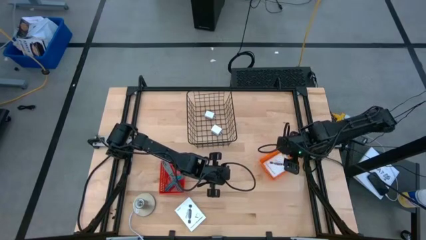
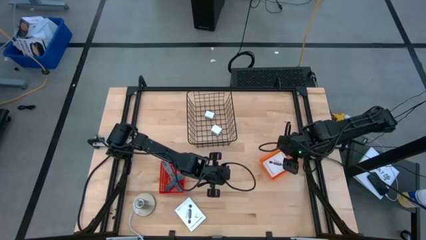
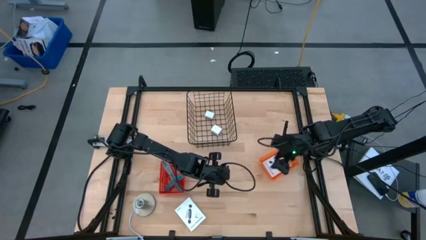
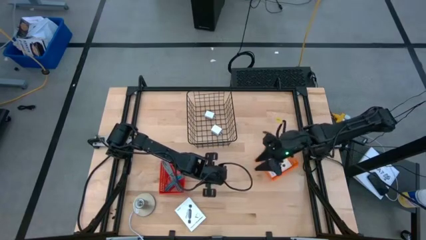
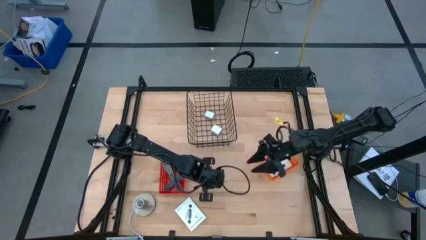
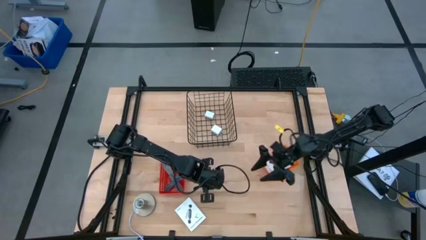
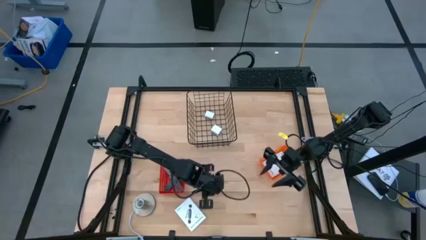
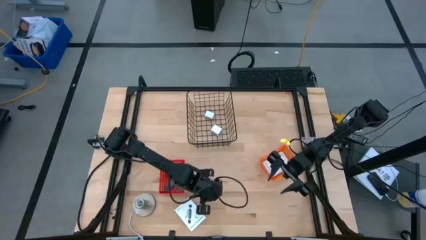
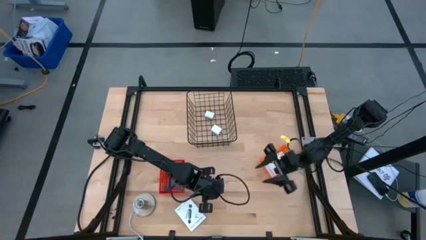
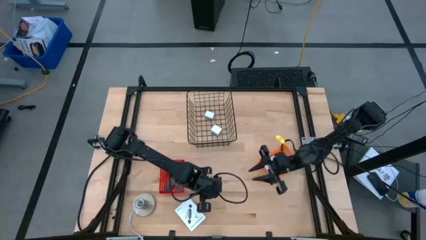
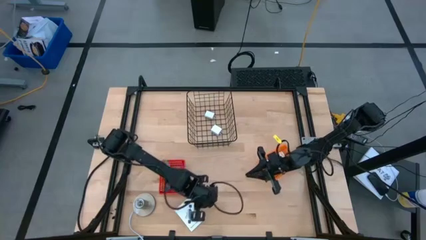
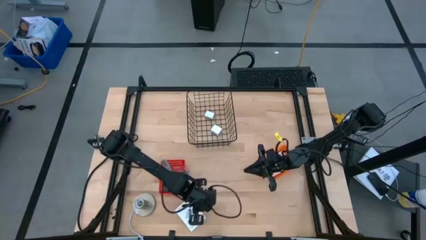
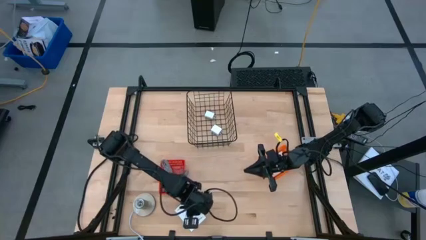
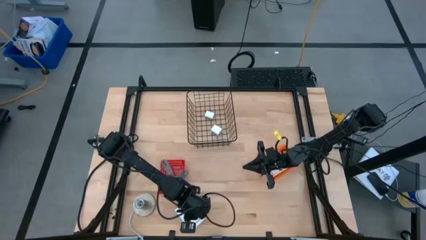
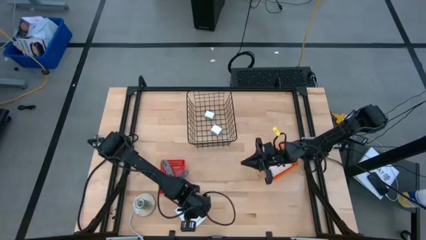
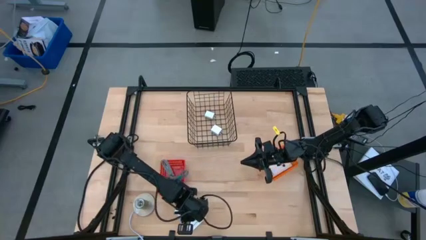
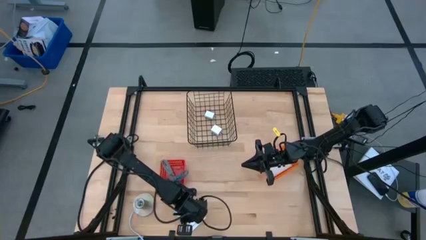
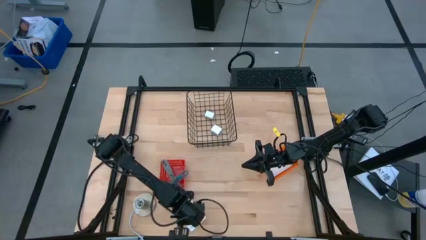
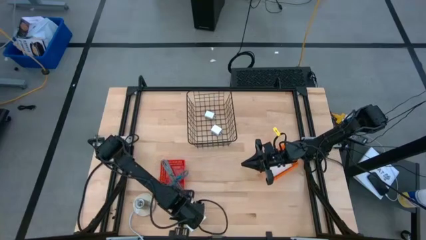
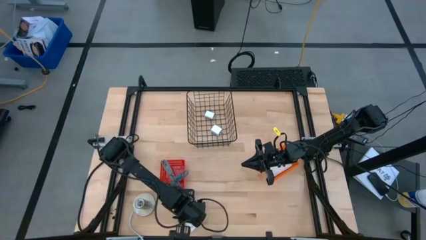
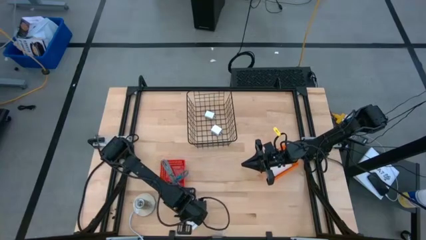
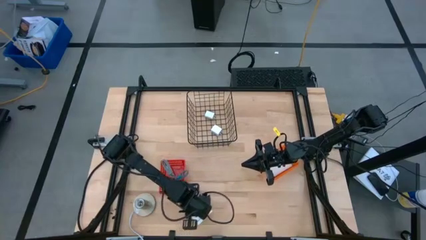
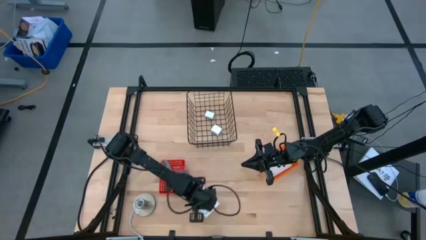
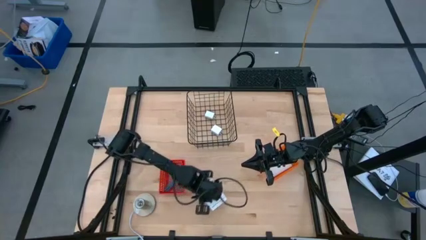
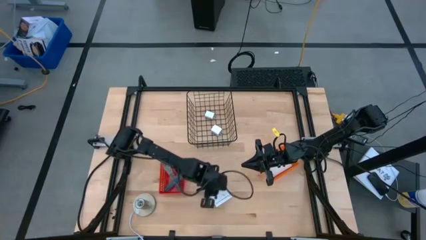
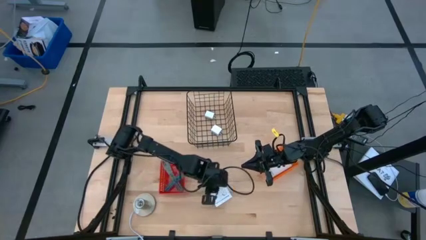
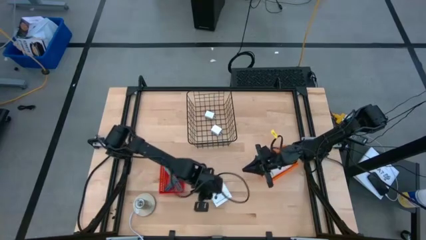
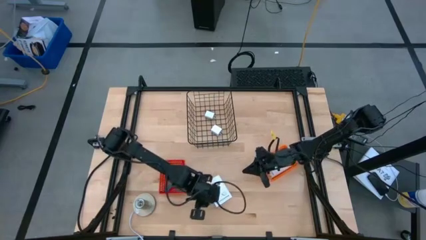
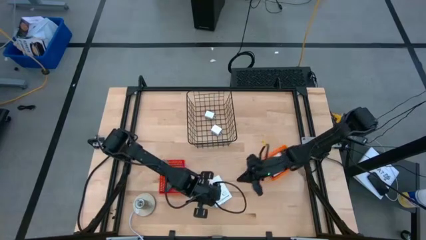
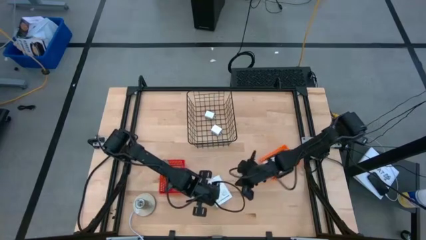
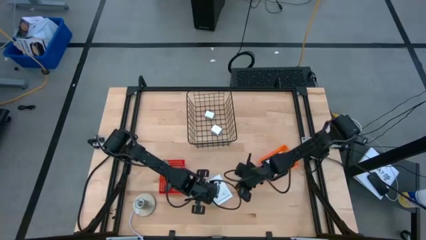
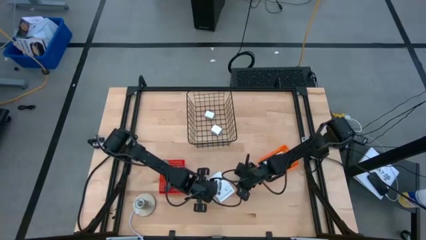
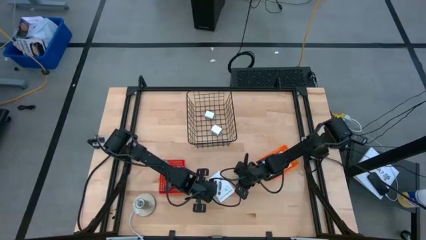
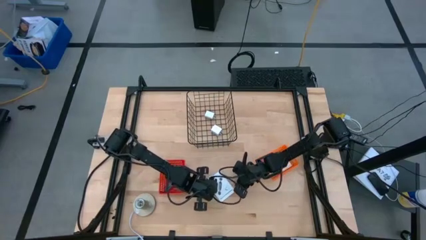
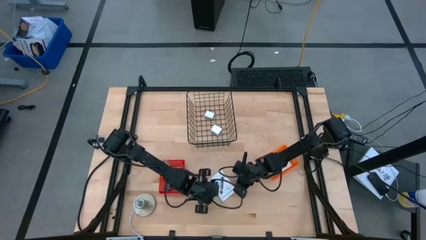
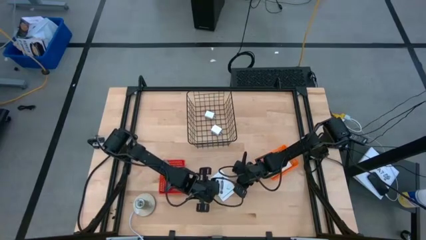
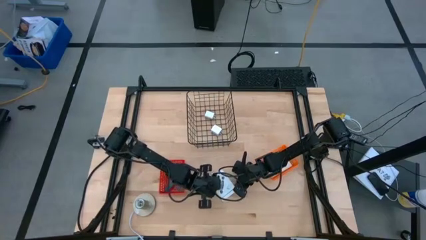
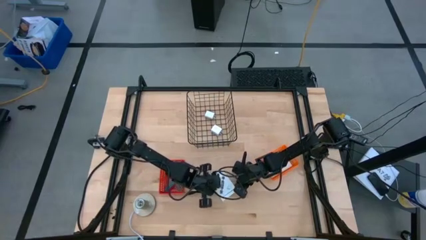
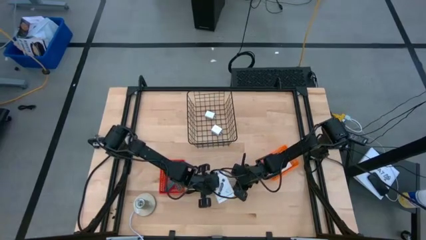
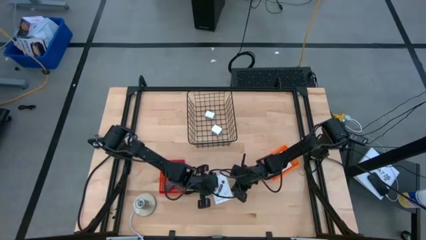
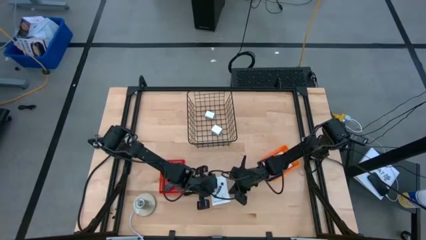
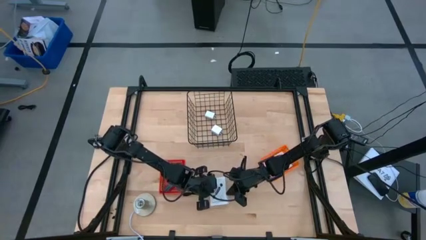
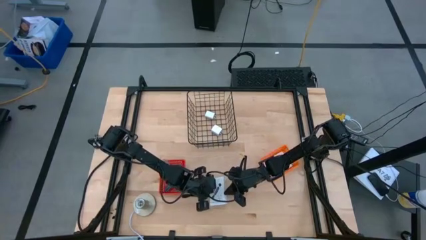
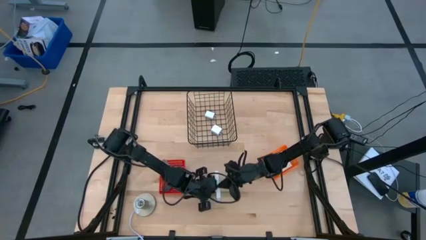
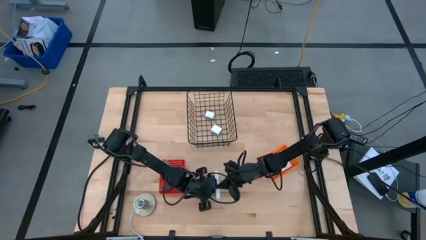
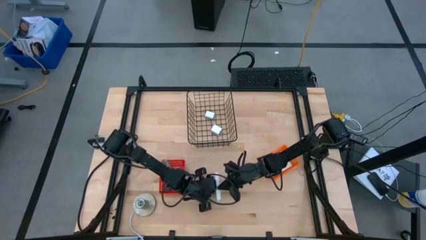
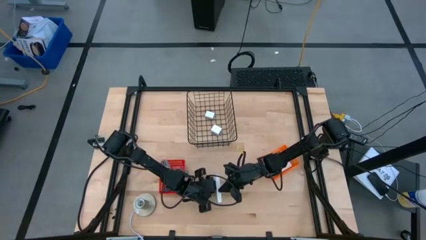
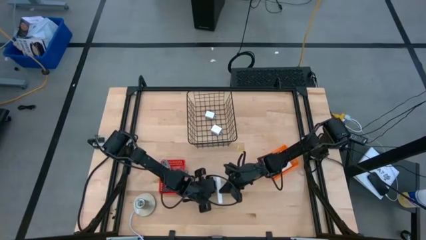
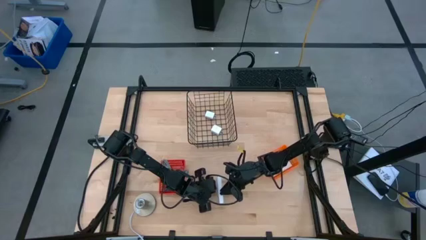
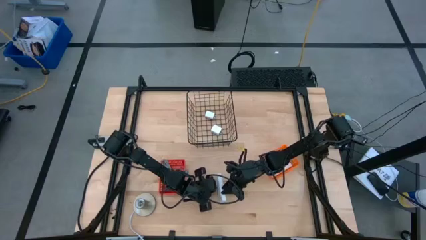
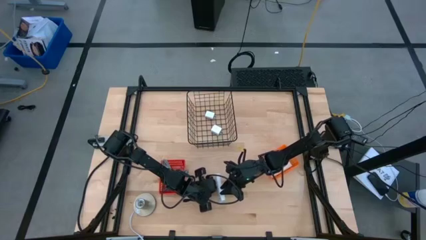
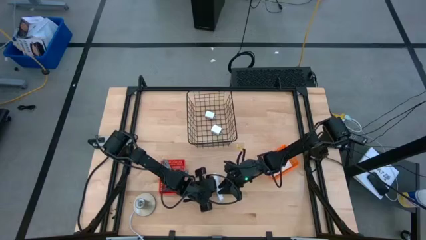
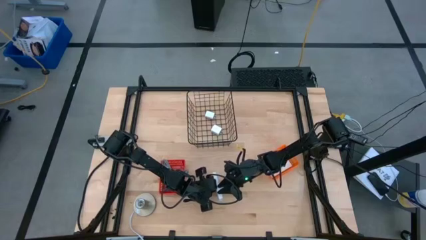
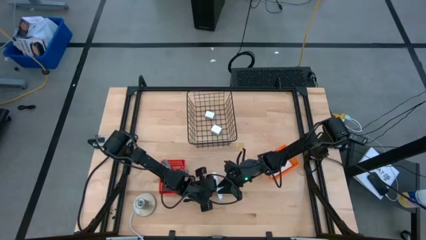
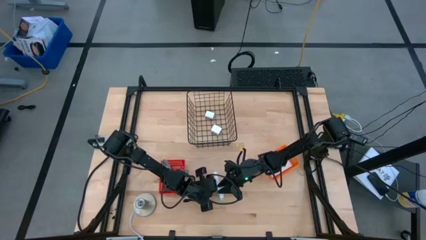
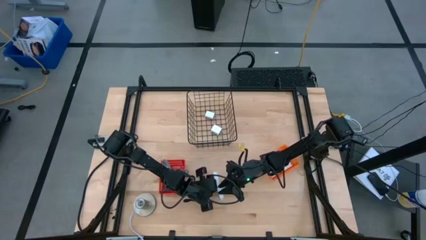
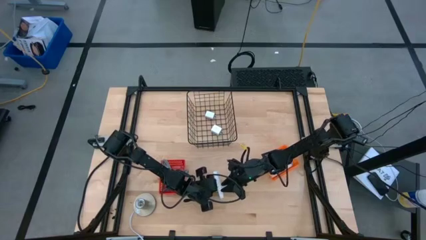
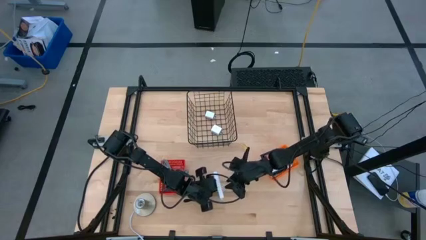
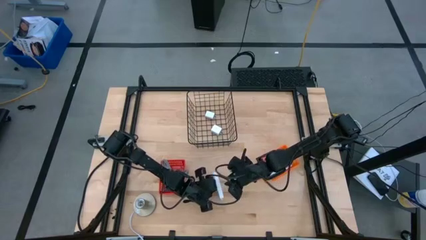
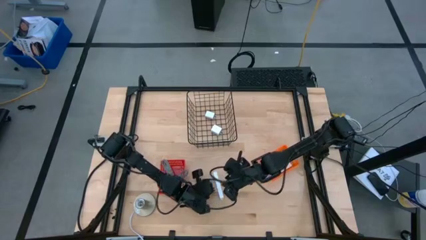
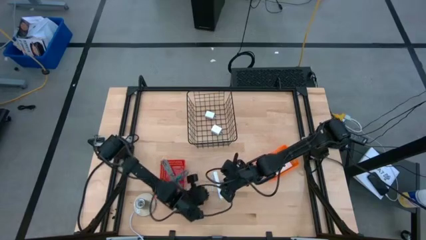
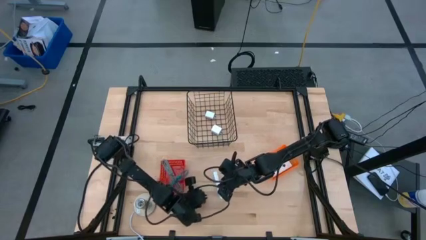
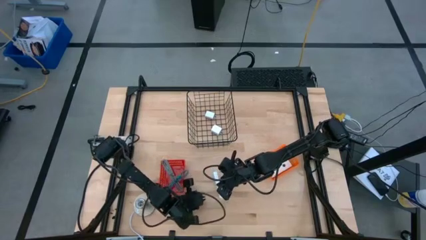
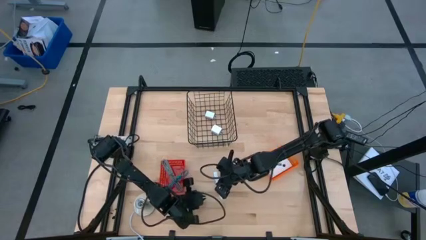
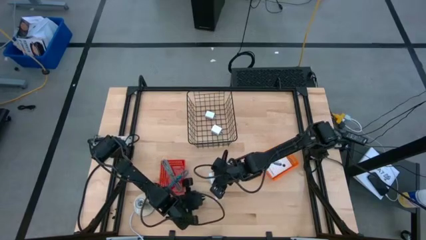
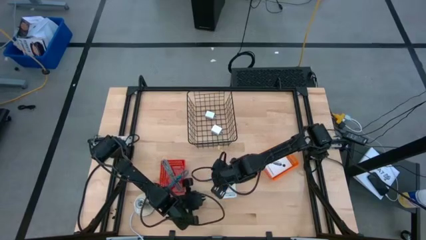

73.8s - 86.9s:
Task: Pick and place items into bin
Put the white card reader box into the orange bin
